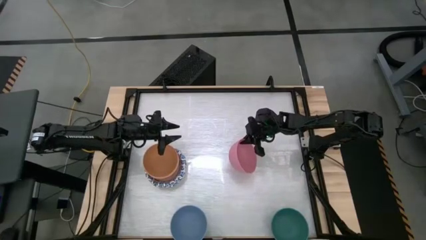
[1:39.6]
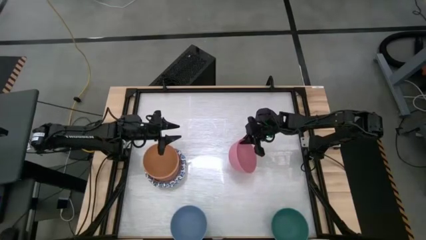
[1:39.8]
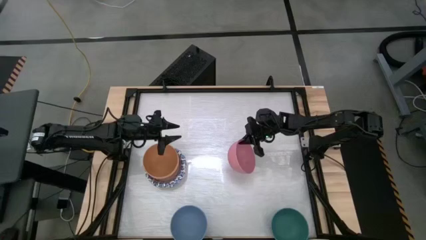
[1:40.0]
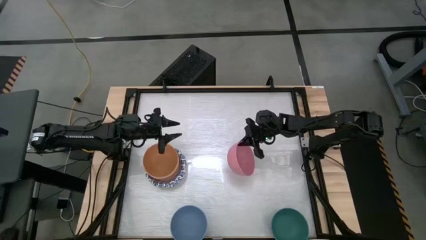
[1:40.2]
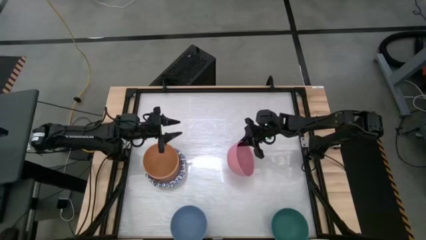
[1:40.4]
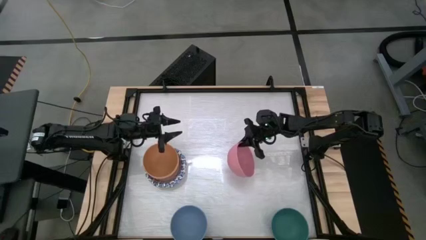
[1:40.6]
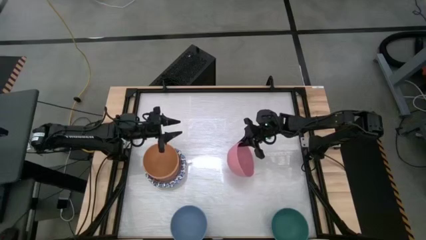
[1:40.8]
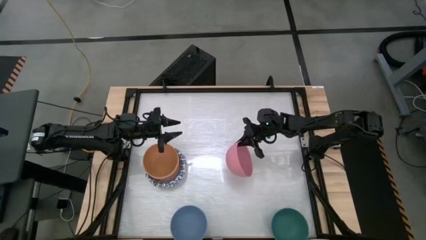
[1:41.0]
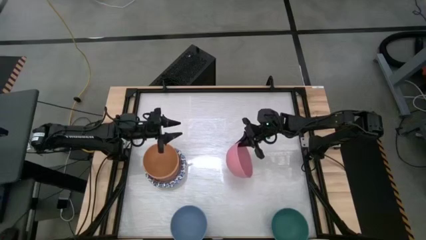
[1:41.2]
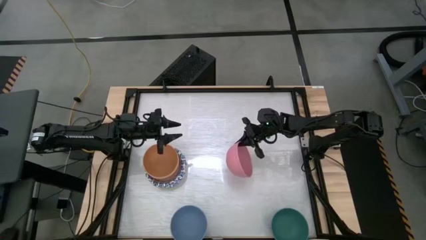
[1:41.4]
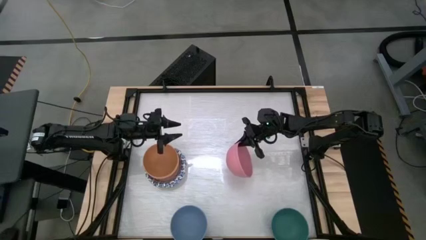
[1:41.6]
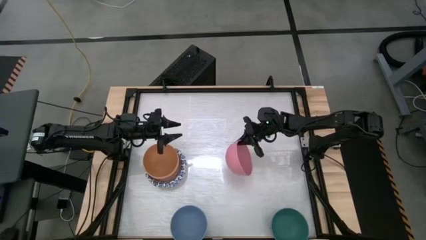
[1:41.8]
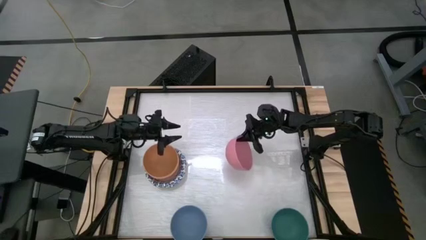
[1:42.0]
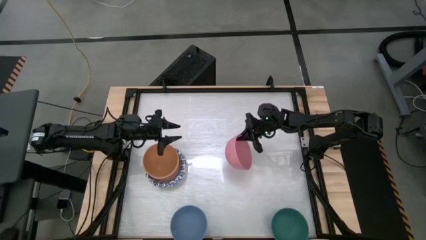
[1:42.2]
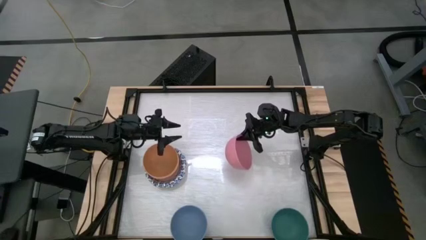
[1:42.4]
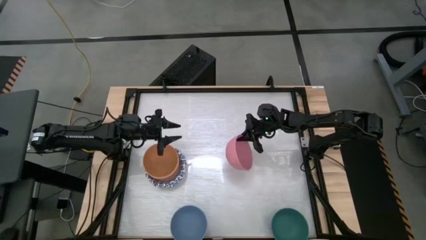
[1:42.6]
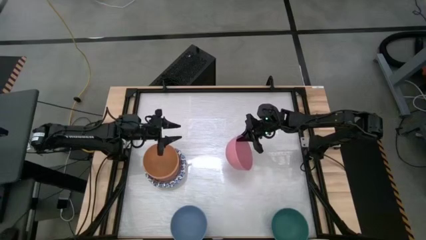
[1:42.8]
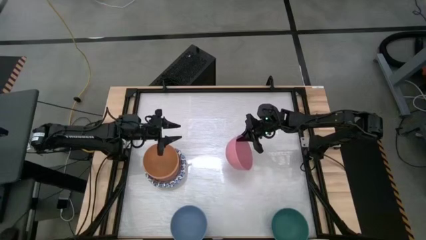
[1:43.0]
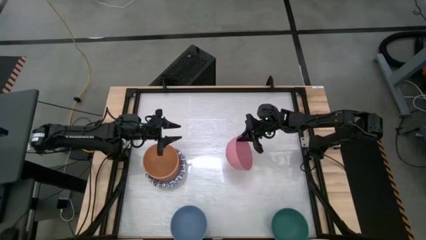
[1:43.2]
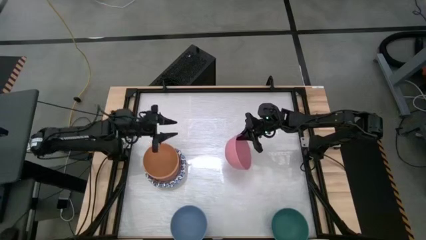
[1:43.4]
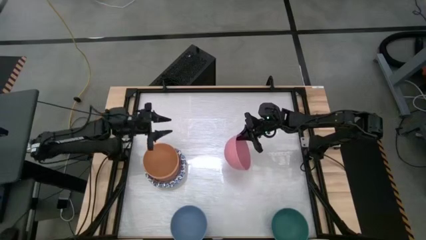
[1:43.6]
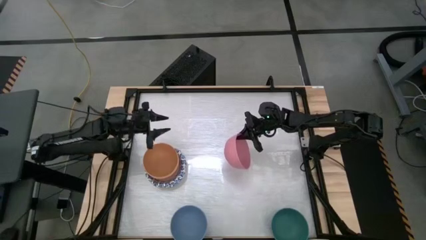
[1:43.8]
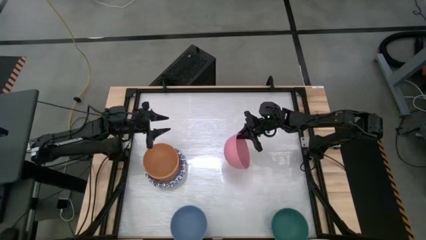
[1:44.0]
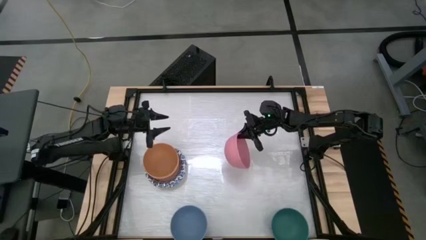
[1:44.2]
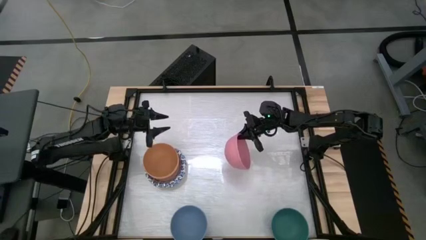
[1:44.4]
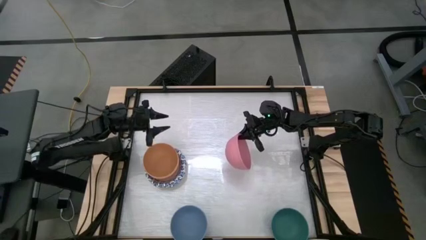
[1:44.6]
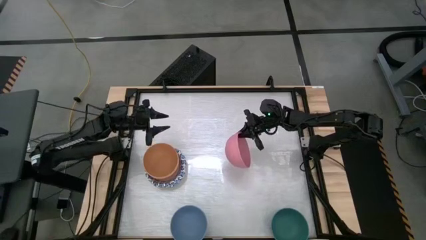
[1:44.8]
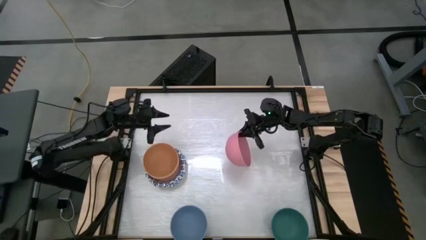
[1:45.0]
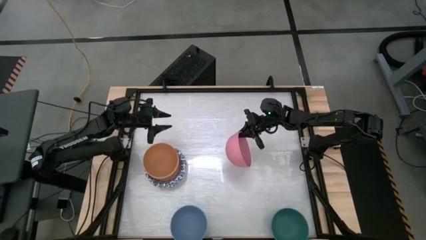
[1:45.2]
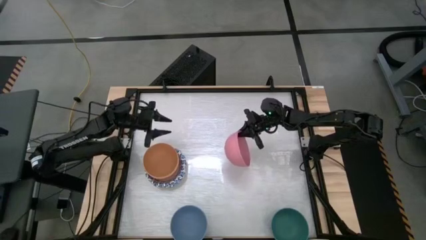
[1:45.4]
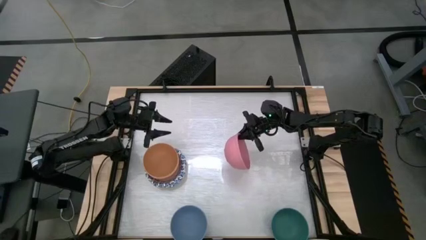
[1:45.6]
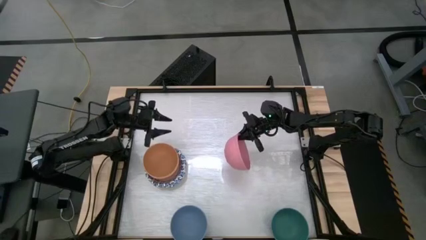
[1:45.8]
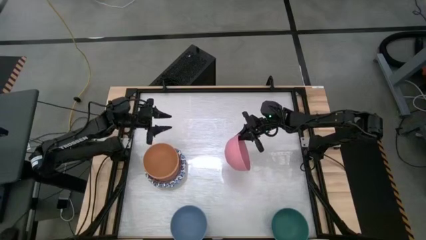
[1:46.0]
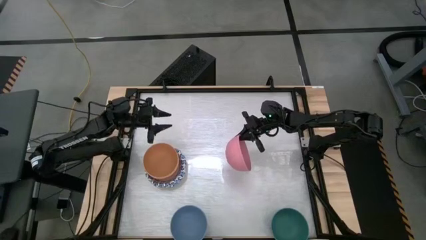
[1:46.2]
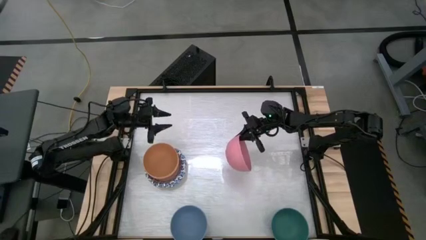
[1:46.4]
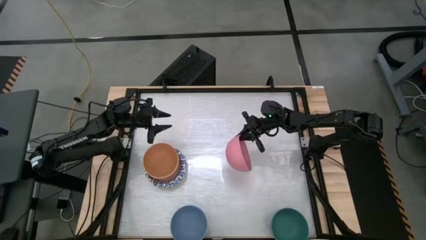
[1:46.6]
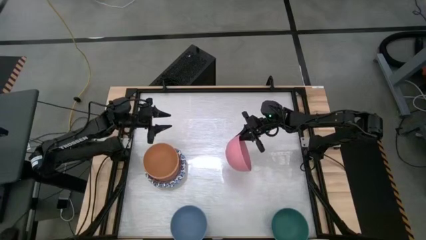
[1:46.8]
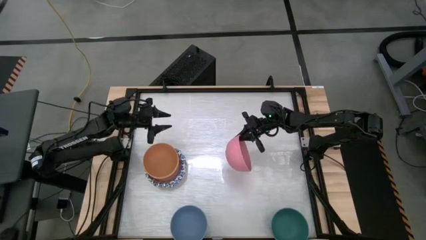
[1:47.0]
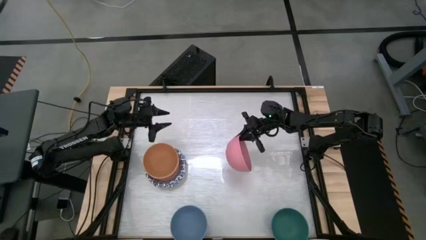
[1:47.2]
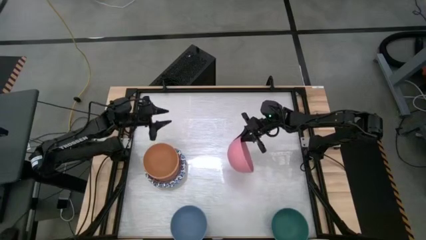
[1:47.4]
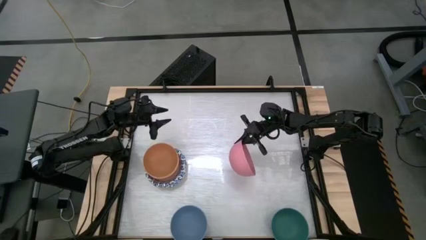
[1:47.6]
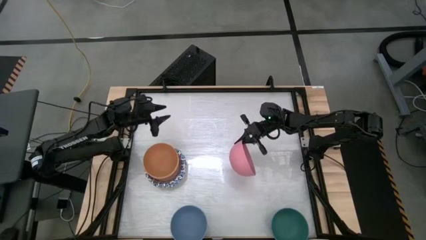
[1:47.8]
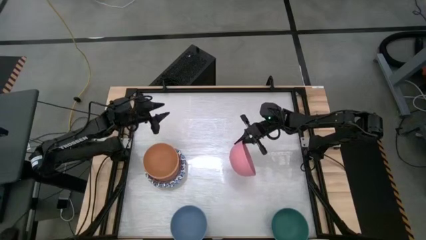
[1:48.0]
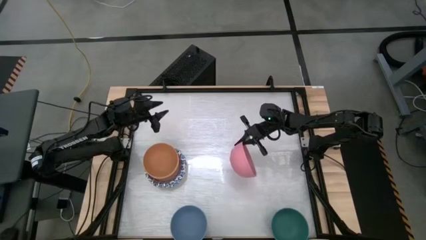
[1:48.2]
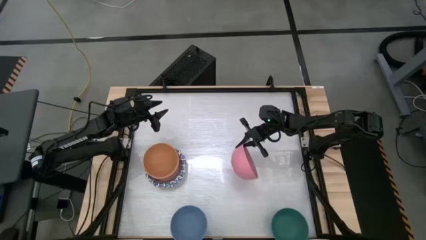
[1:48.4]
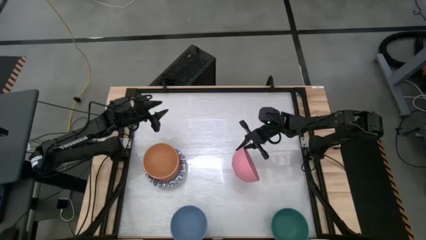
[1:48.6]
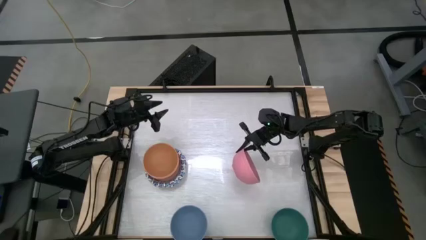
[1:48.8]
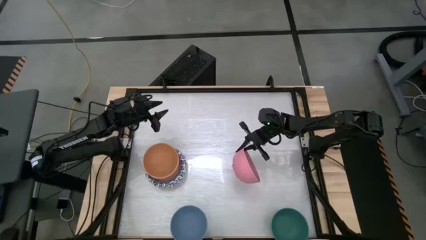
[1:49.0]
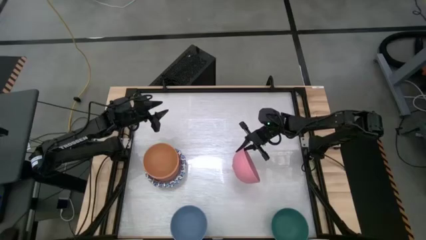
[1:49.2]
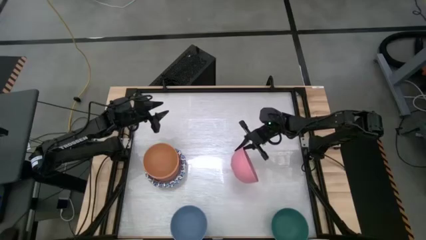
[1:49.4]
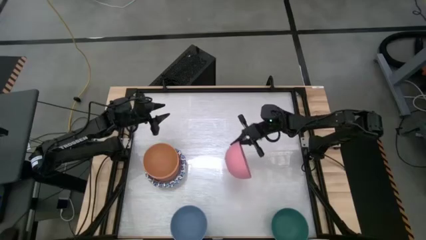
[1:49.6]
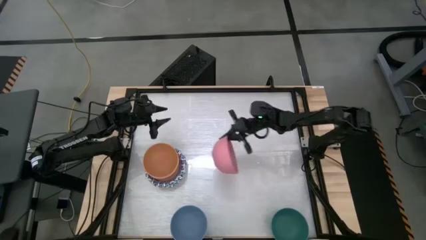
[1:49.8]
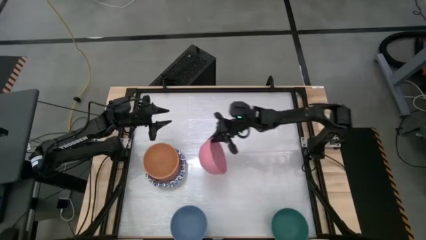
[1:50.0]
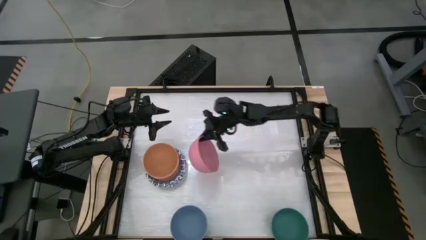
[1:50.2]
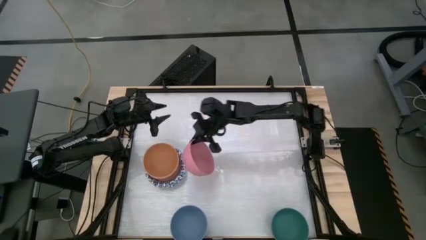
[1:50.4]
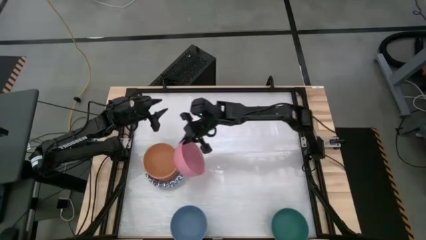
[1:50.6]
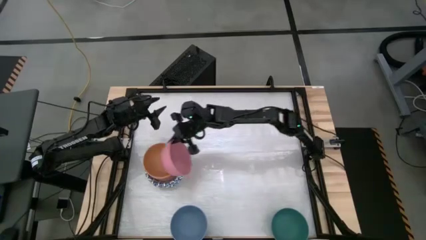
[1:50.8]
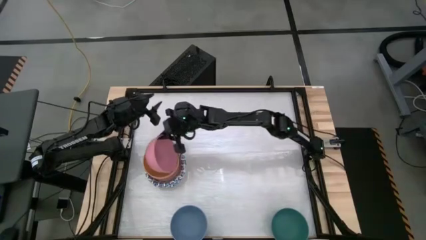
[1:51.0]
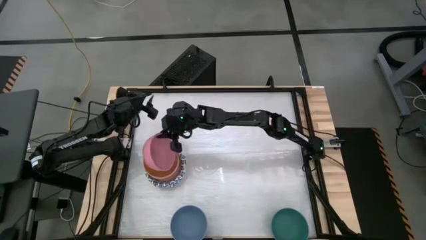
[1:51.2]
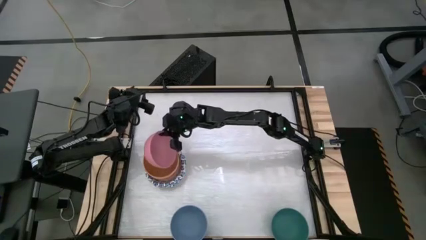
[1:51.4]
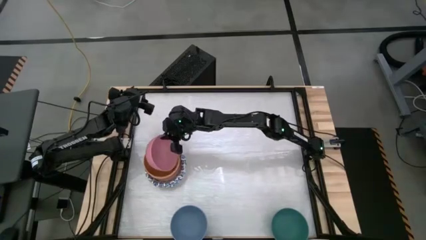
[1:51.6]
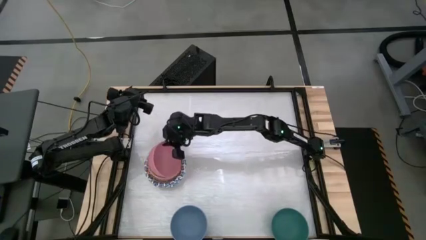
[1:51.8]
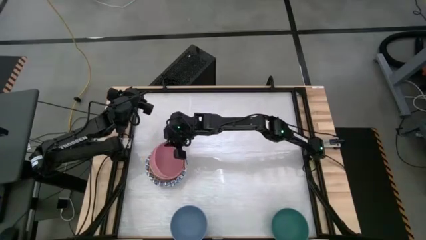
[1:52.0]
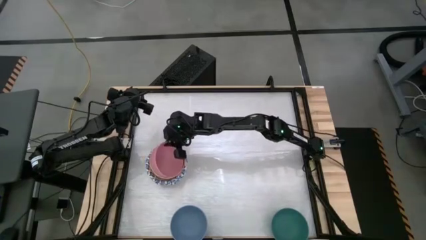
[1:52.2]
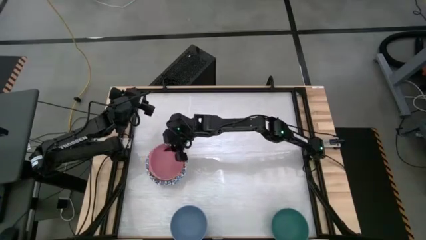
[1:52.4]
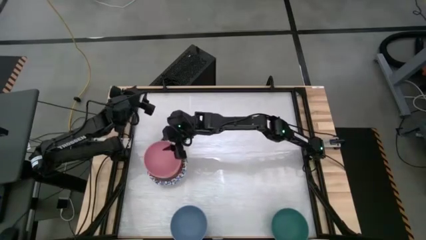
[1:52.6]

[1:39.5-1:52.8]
Stack the pink bowl into the light orange bowl
